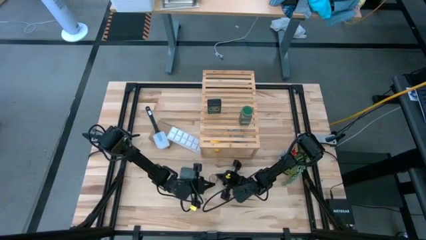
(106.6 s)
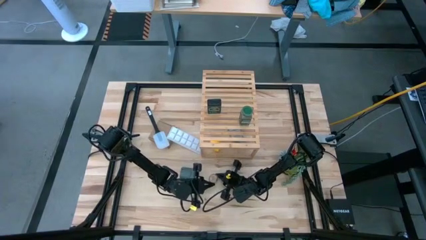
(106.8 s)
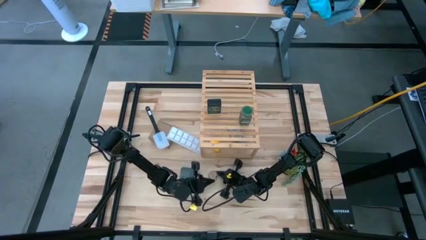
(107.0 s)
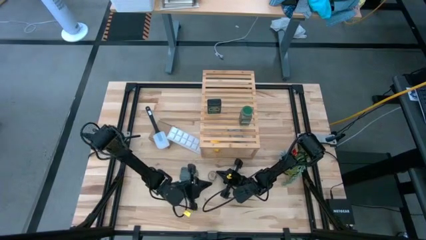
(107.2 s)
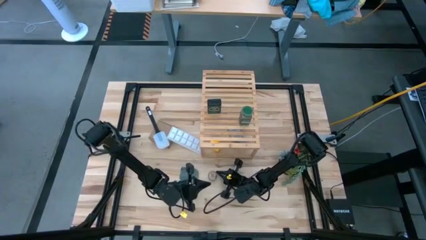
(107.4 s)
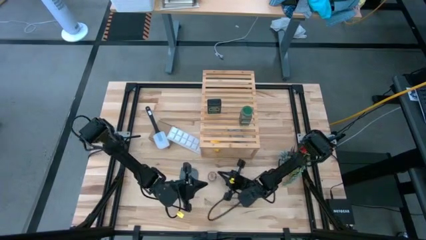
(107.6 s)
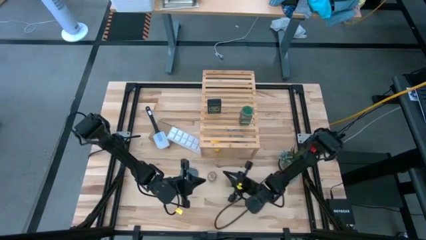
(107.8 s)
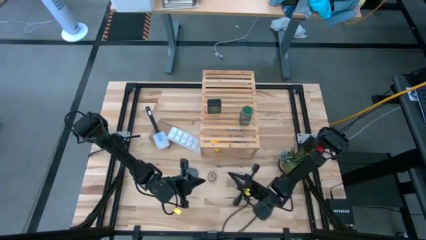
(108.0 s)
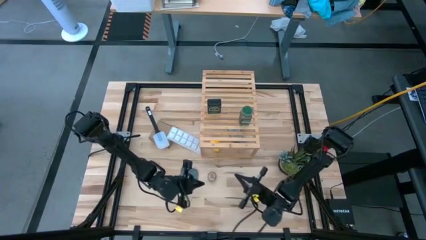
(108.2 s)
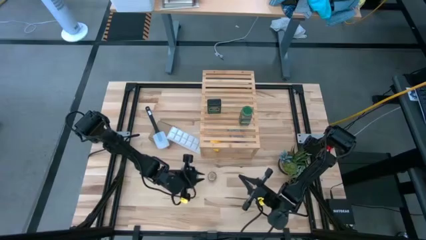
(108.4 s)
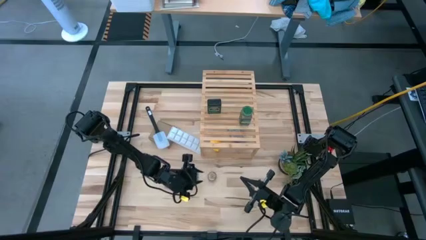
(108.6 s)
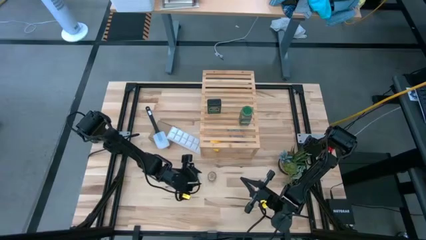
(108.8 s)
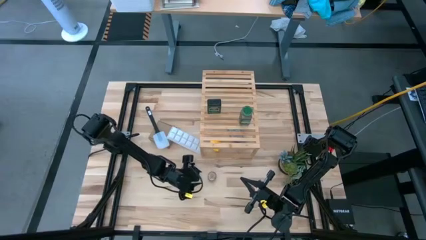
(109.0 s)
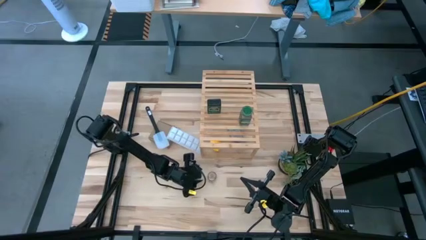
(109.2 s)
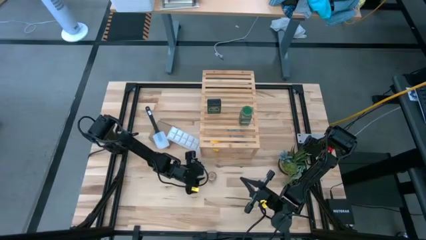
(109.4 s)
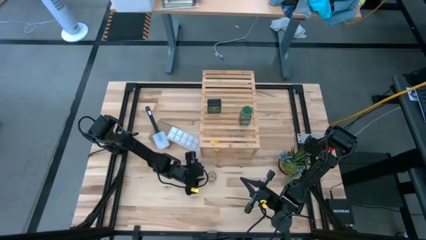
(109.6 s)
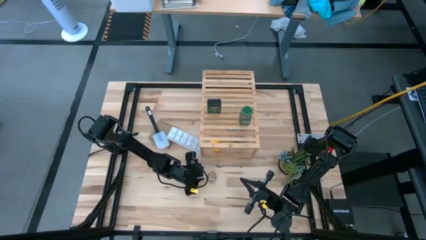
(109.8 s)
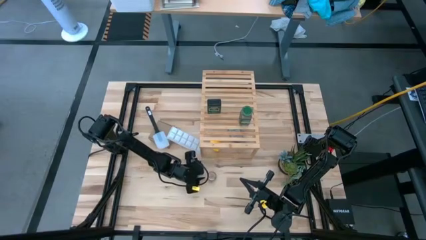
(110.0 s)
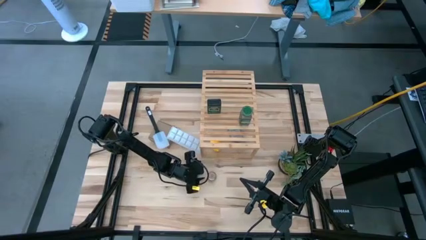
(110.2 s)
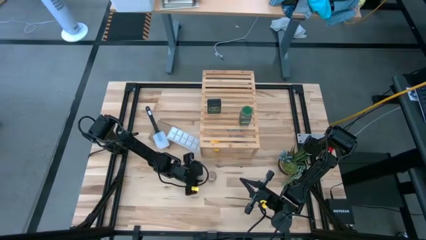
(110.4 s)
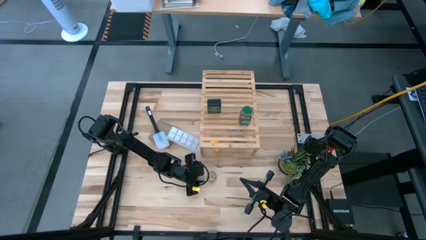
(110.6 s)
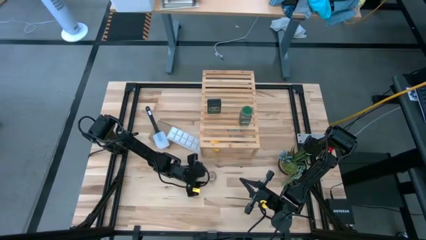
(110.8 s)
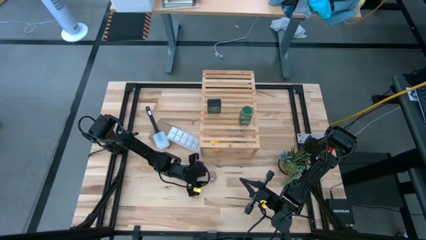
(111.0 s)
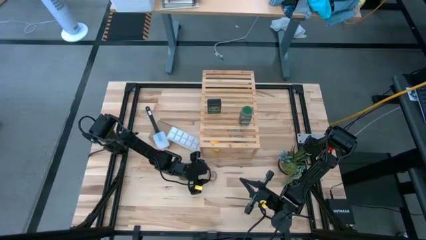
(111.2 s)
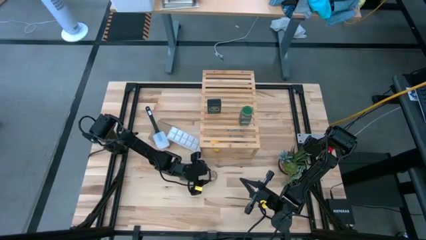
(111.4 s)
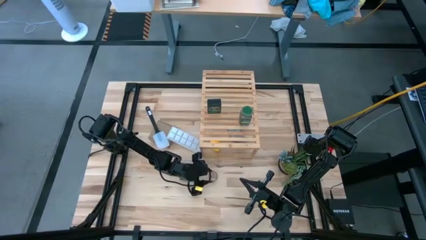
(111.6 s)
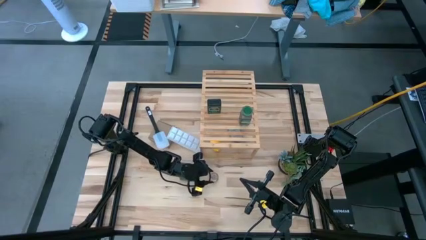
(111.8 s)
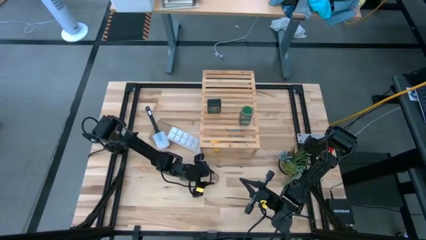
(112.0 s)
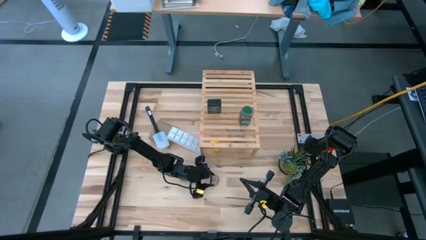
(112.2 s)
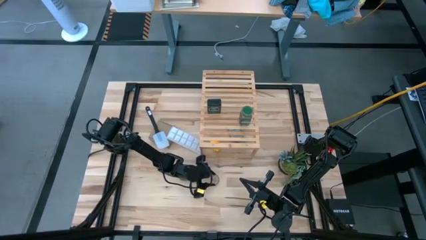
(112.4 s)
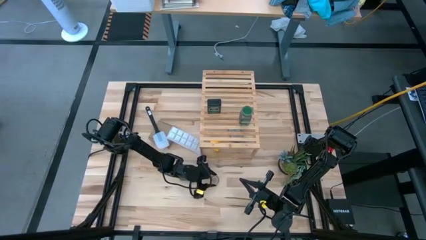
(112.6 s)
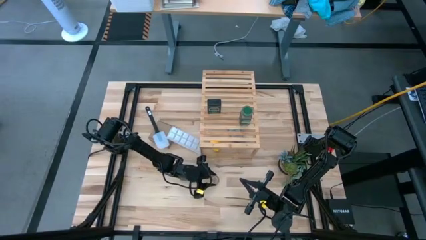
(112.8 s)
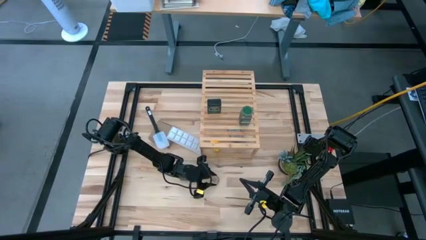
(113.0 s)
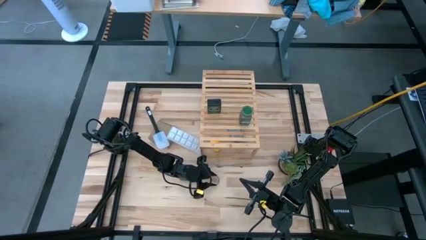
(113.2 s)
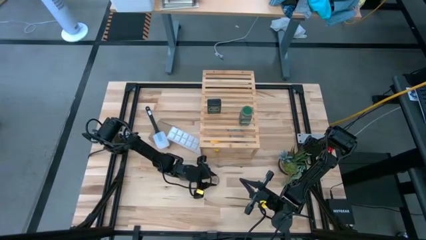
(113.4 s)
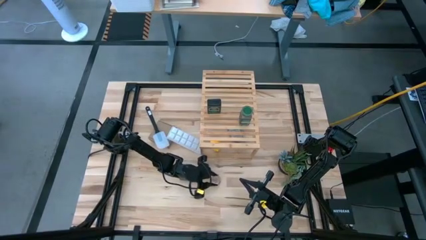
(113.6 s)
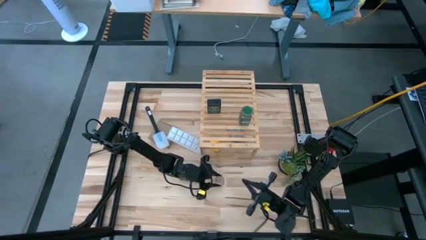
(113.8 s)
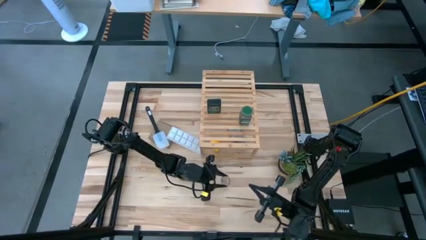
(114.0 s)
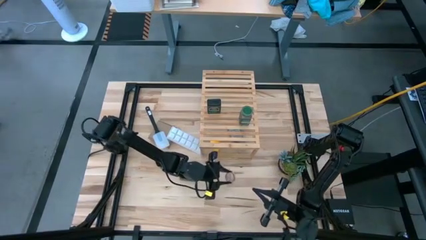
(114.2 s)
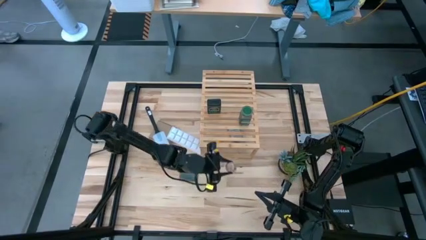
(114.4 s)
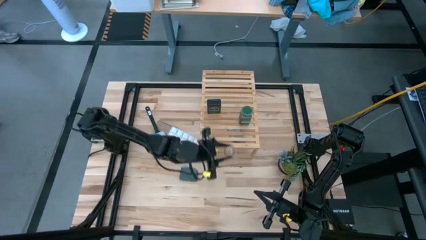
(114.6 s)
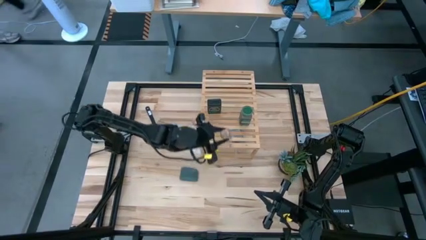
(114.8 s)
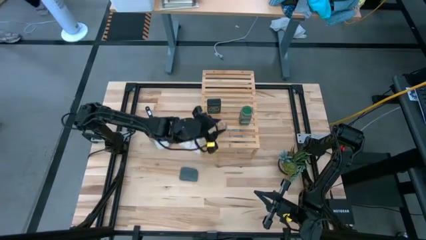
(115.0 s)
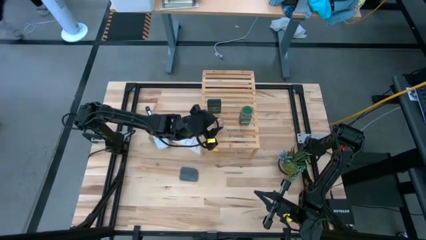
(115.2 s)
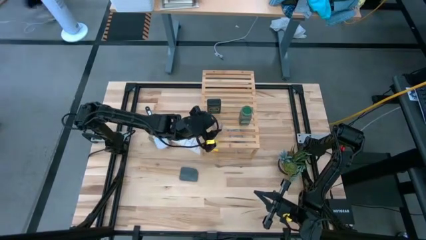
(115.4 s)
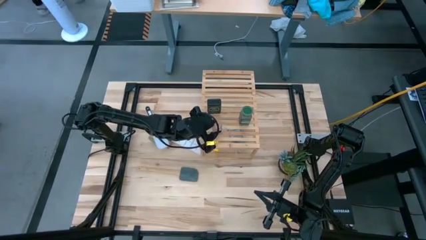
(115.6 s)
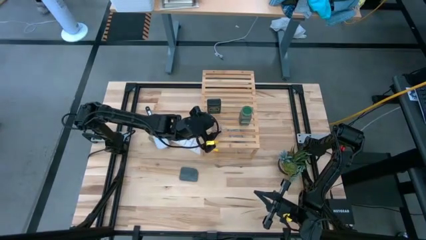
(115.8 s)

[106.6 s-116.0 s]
Task: Shelf spices
Put the brown seasoning bottle on the shelf
